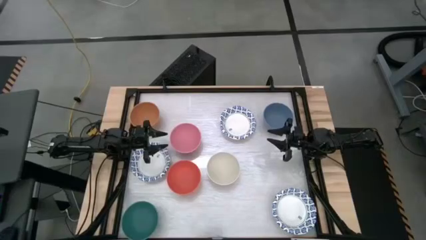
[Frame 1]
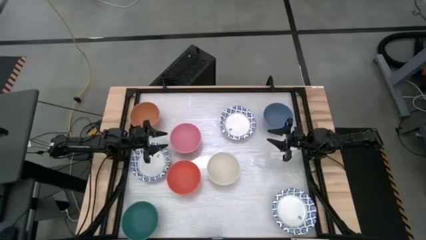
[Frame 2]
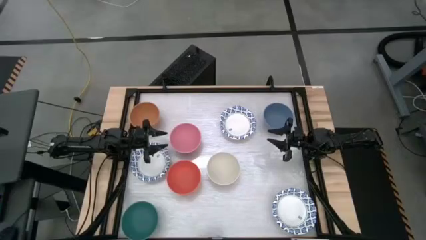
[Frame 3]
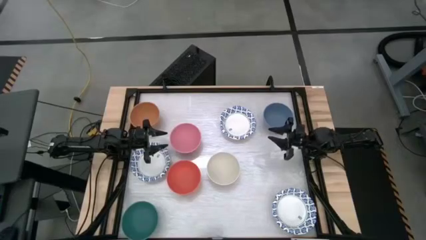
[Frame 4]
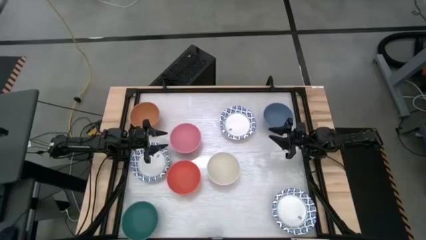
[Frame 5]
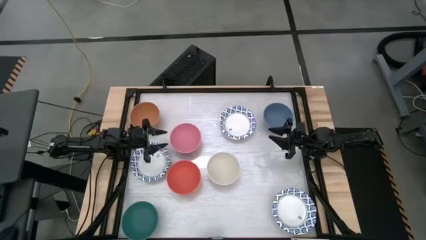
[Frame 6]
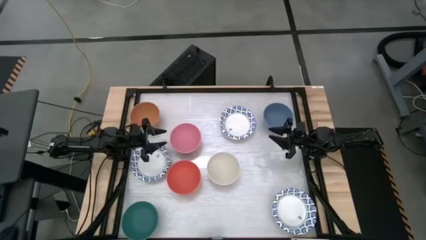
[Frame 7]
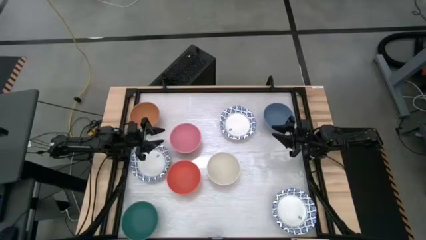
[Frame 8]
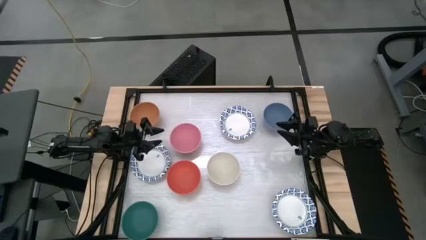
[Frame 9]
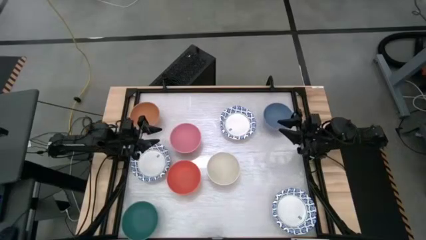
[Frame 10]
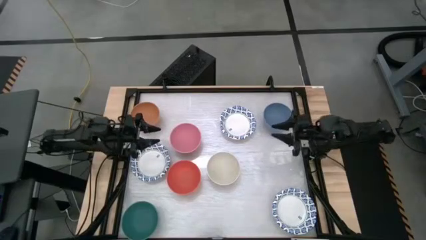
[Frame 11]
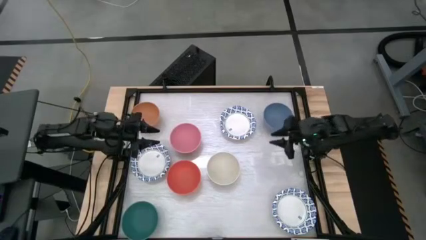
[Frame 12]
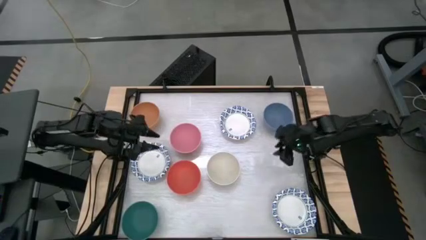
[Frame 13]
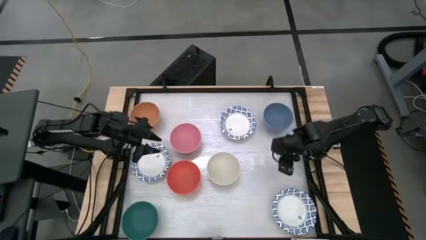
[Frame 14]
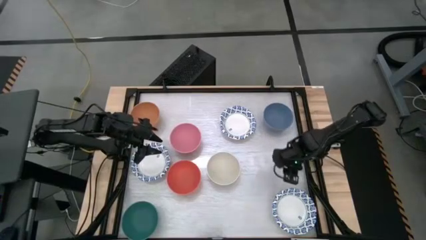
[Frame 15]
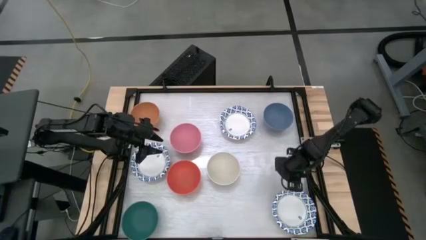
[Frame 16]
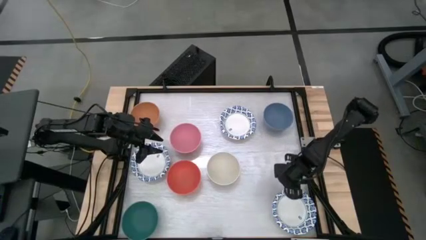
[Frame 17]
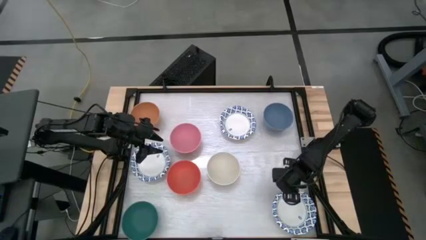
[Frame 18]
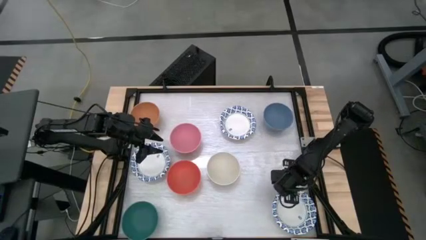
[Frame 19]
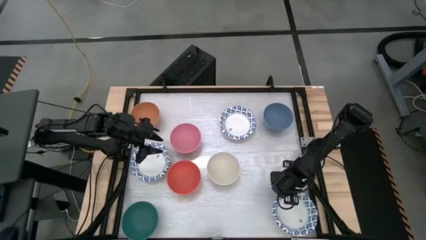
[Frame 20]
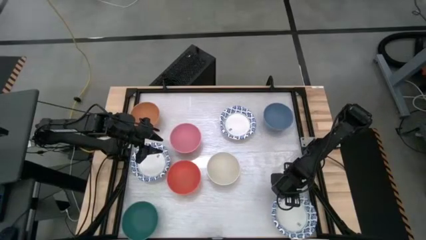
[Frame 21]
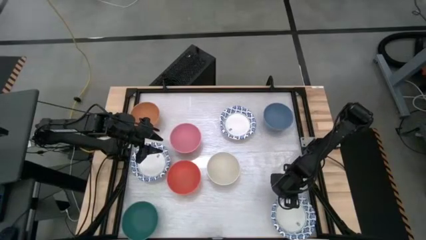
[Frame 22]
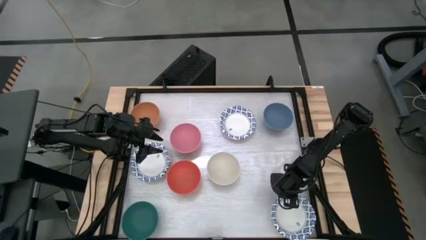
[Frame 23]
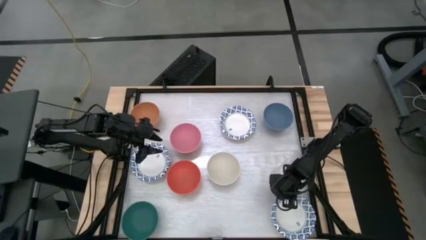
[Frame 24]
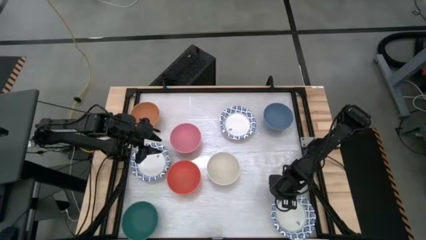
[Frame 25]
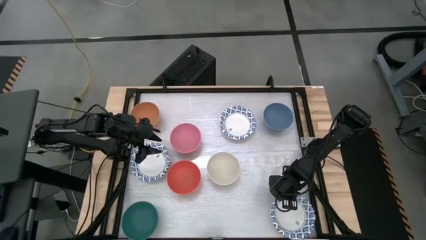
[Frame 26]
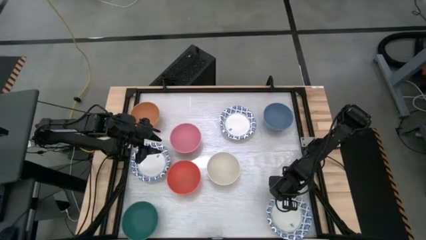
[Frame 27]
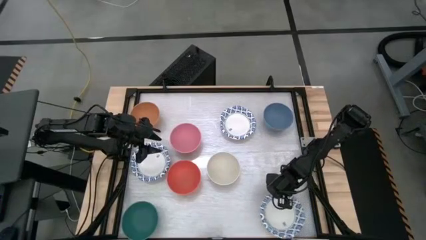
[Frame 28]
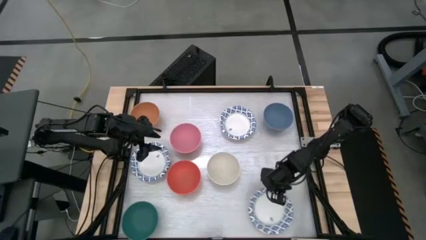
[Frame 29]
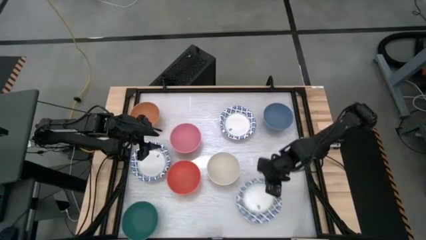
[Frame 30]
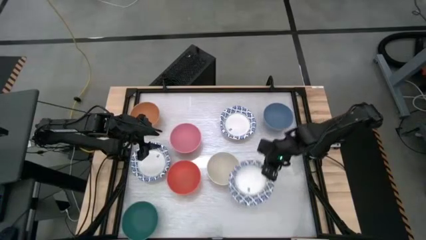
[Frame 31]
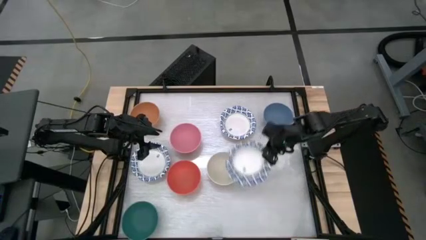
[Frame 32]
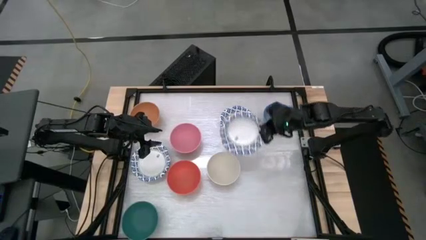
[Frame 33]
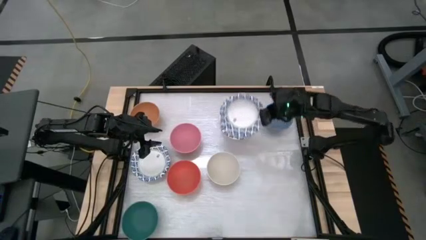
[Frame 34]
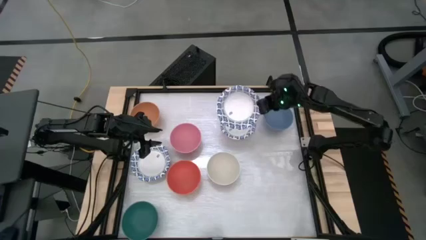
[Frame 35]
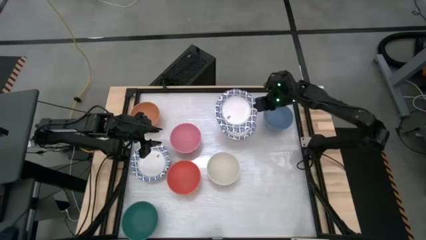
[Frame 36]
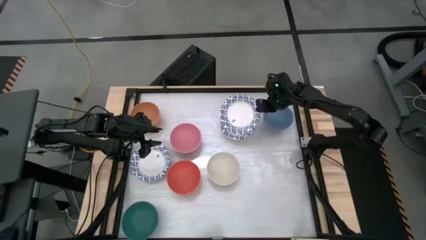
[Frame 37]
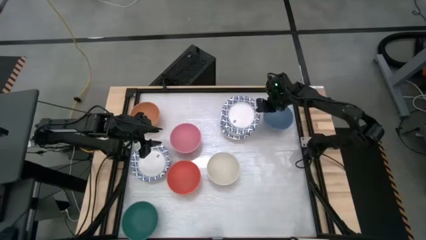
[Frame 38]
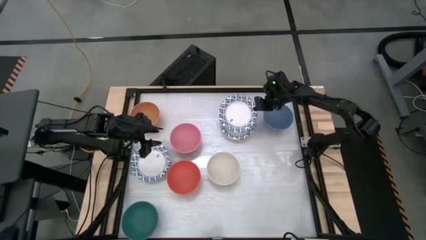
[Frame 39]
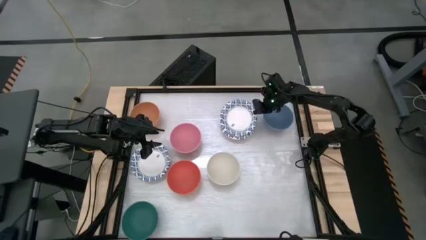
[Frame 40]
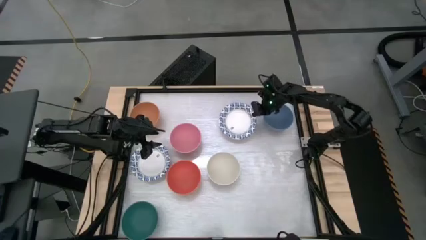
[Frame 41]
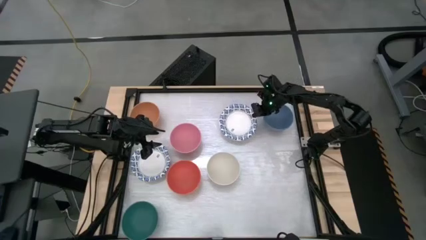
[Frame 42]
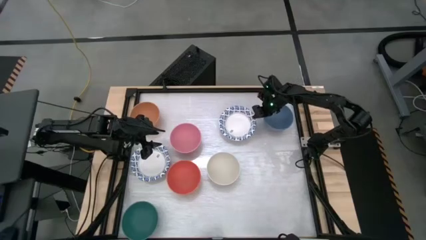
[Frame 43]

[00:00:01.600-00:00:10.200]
Task: Nest bowls inside each other by size order
Stack the bottom blue patterned bowl on top of the top blue patterned bowl

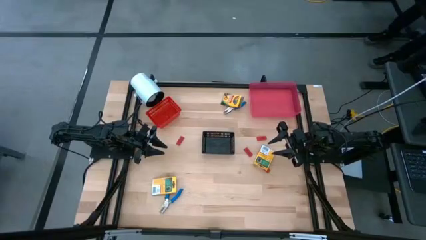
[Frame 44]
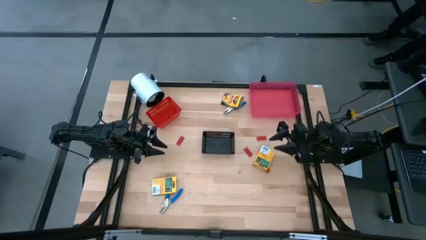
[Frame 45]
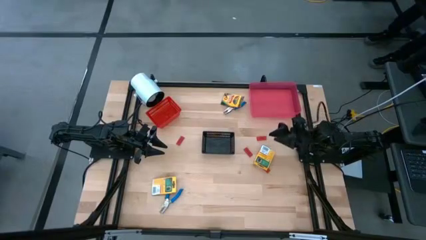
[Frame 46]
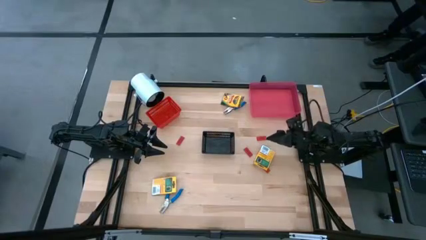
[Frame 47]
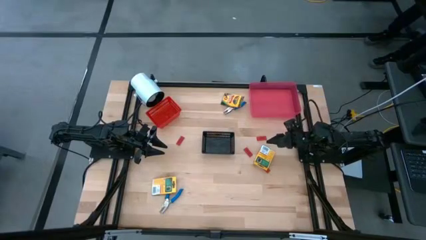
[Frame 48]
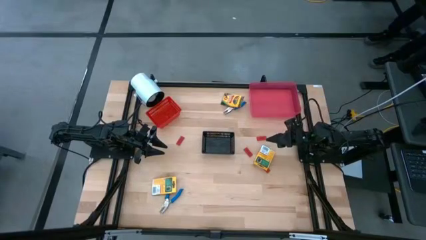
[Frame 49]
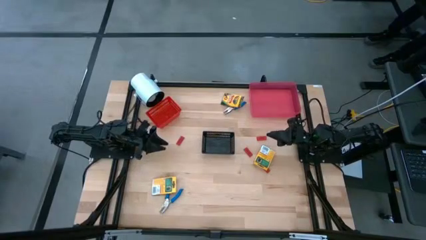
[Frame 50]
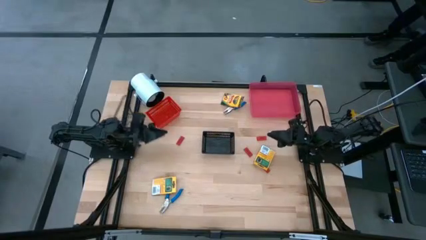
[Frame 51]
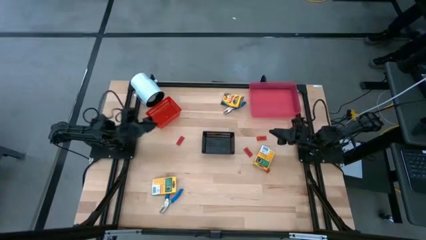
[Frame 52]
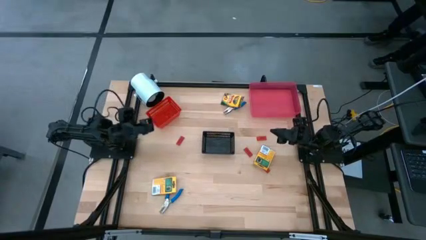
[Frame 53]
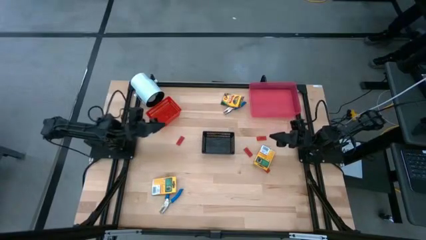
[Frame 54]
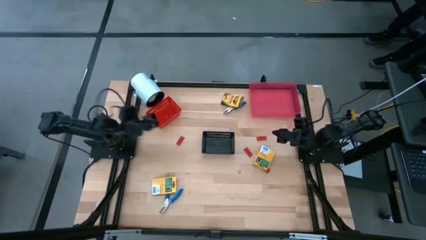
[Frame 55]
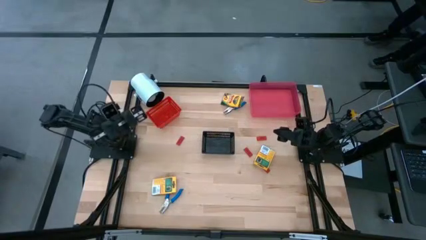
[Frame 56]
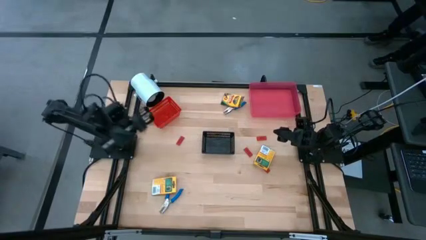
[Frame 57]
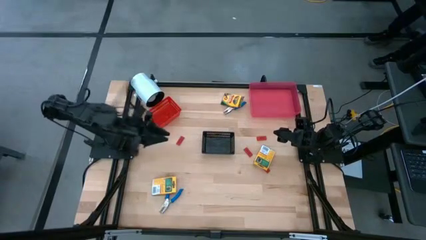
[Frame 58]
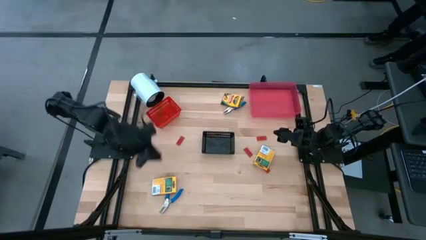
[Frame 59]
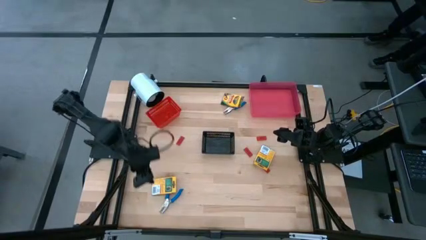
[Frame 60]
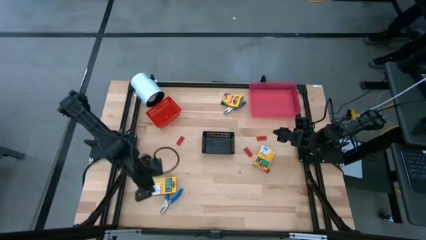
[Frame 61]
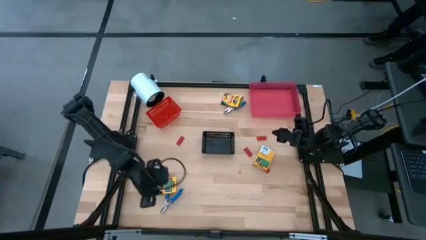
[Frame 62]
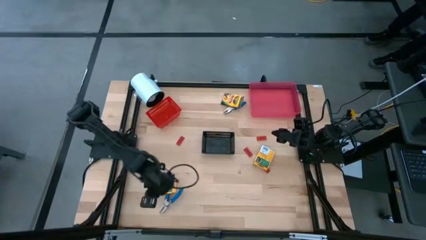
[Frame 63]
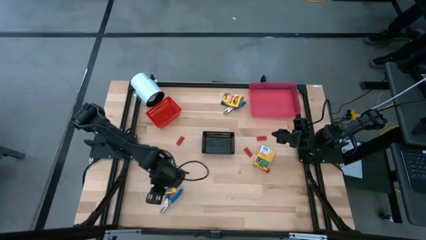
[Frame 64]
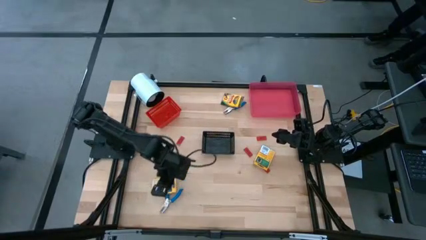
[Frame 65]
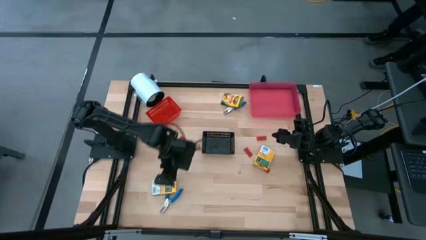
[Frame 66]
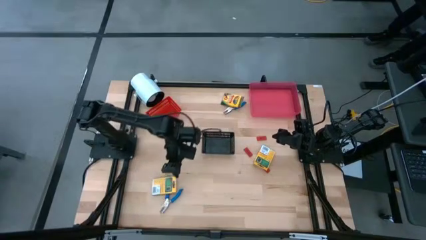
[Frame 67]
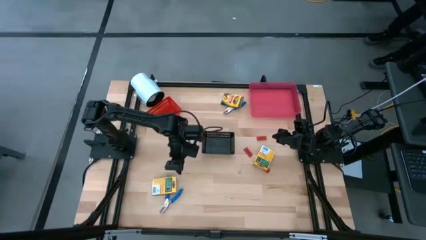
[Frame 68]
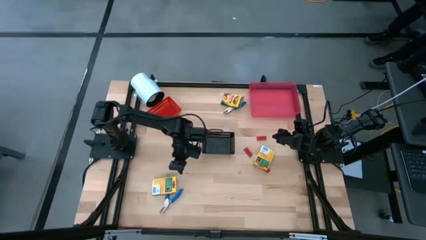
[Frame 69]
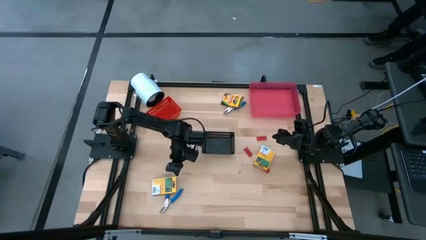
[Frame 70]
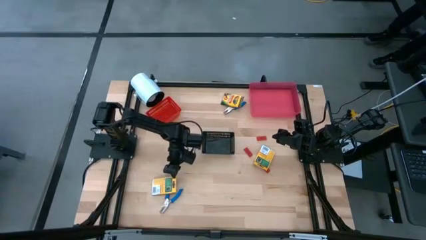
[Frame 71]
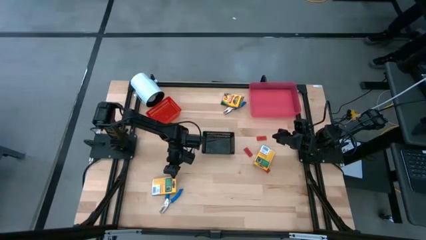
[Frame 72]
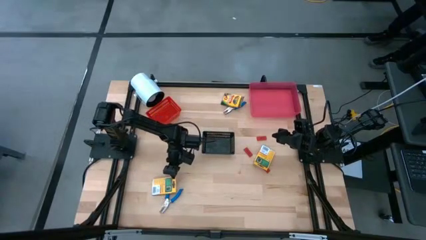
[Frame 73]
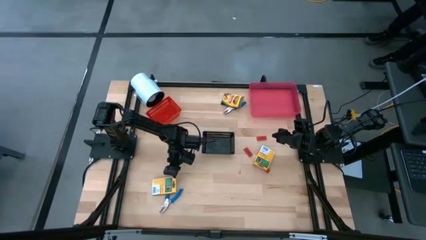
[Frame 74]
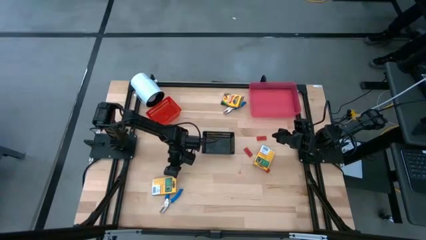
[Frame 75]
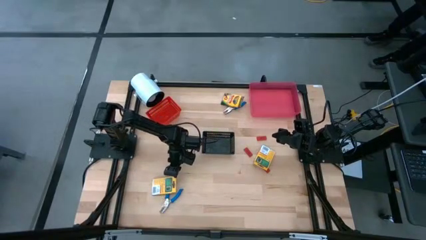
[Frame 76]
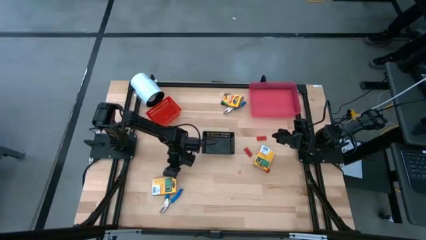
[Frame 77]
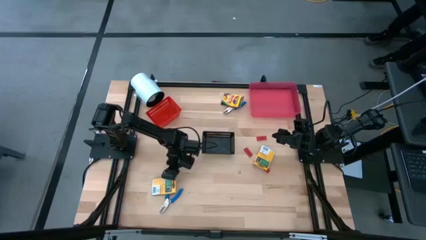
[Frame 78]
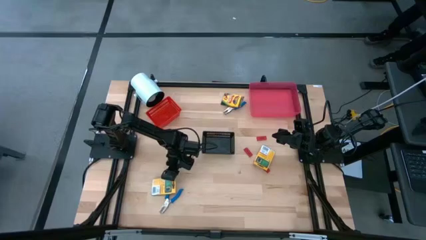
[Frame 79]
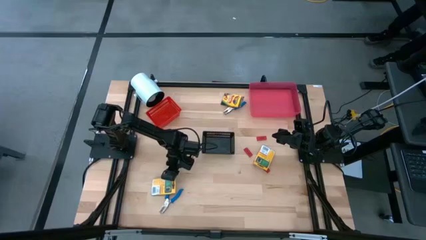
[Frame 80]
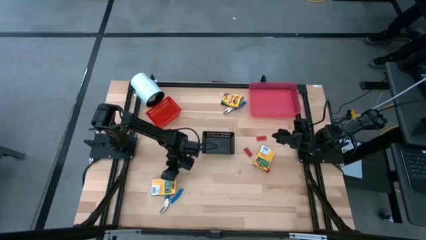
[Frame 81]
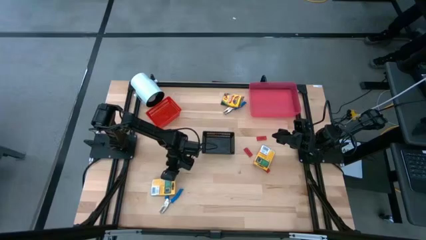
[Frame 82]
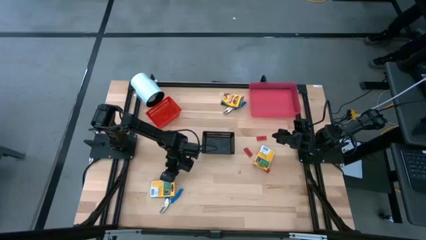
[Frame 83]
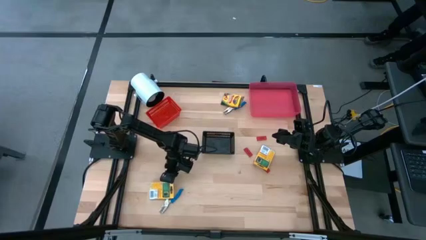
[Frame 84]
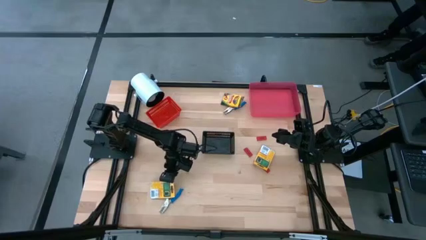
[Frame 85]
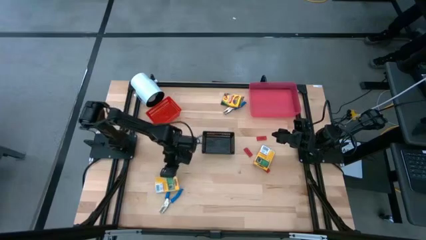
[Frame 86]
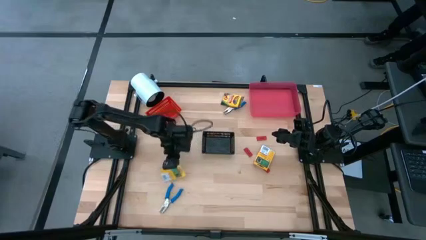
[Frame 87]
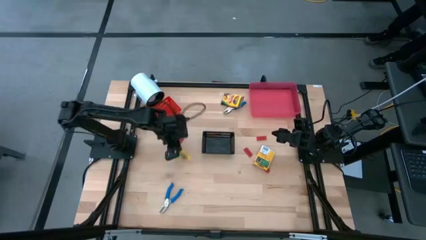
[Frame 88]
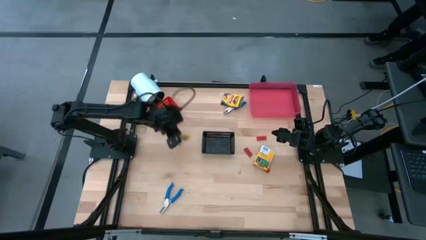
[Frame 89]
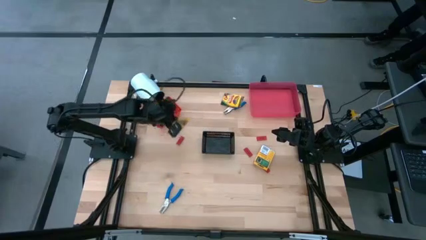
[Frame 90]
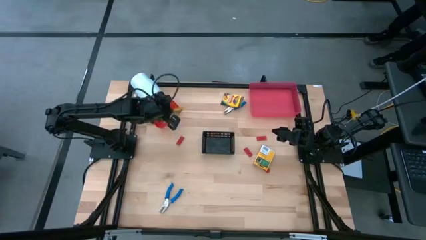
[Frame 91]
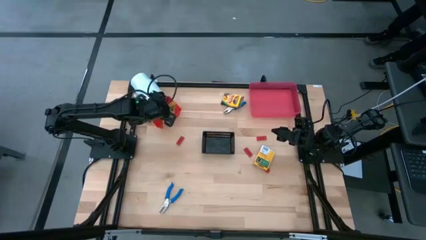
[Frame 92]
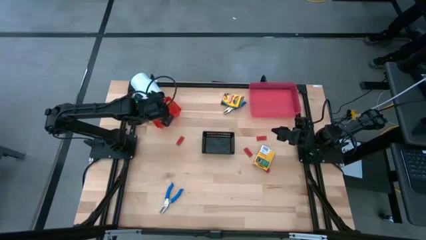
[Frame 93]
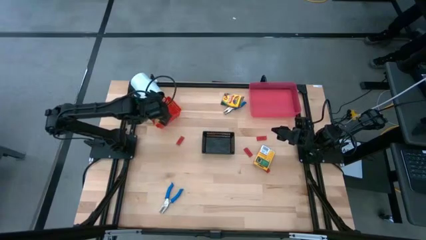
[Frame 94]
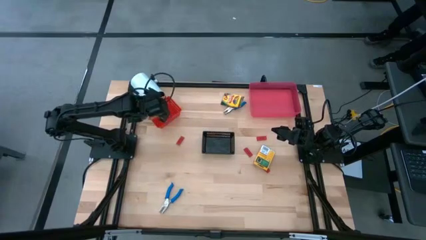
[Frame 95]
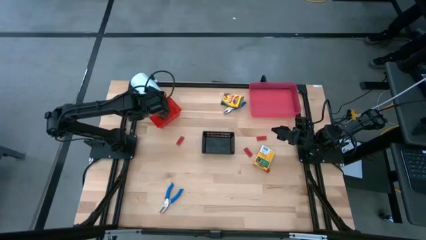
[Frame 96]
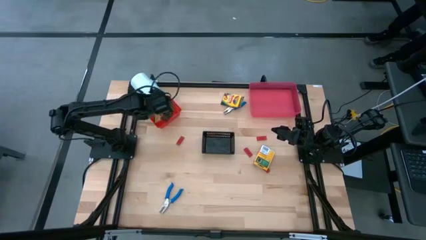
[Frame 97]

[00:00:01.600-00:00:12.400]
Task: Pick & Place School Supplies
Put the bottom left crayon box into the red bin
